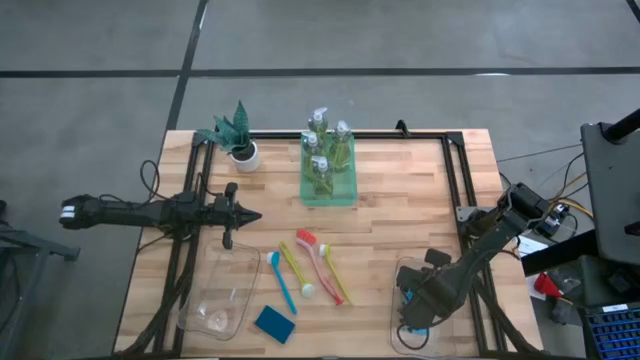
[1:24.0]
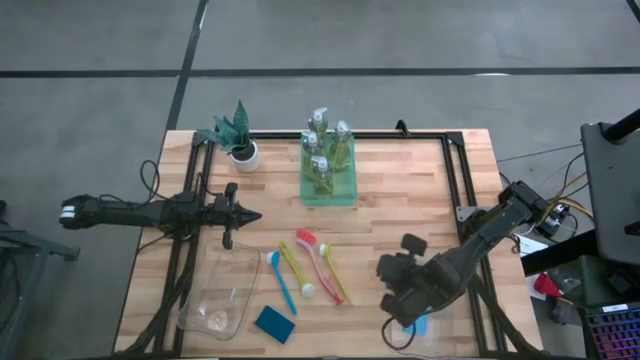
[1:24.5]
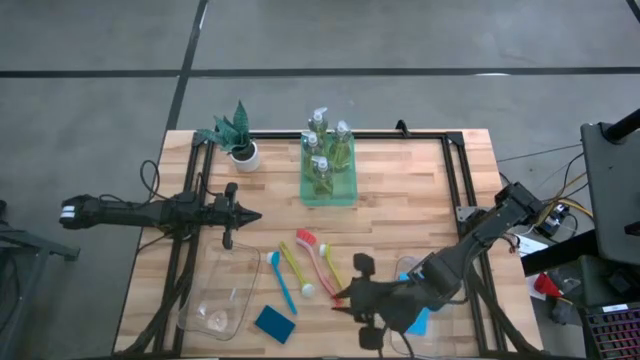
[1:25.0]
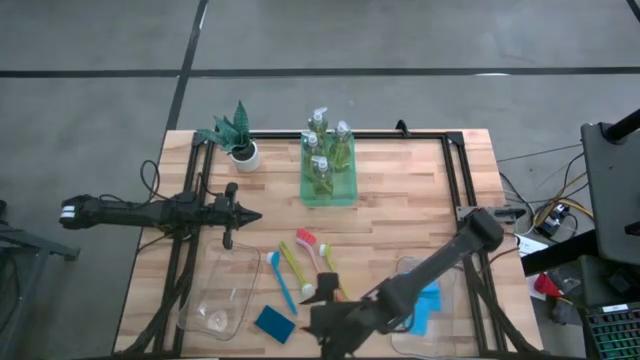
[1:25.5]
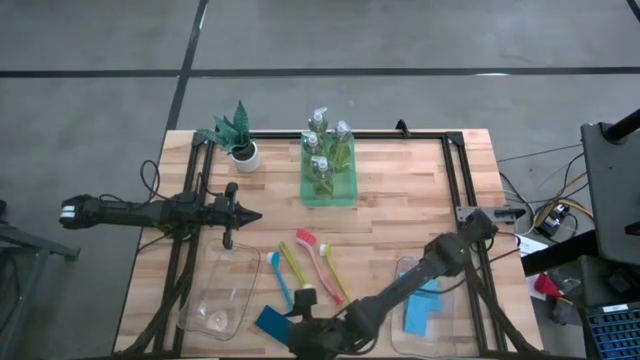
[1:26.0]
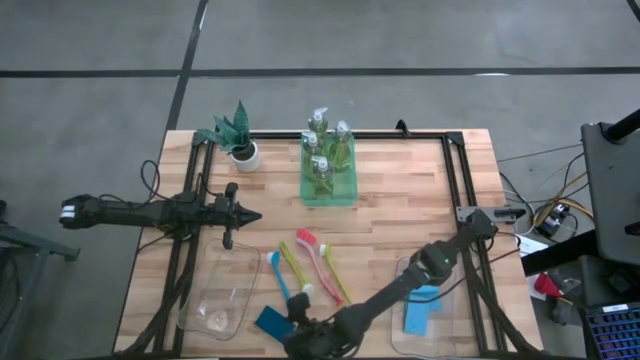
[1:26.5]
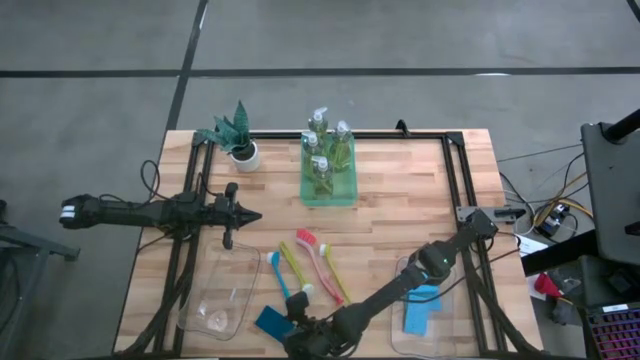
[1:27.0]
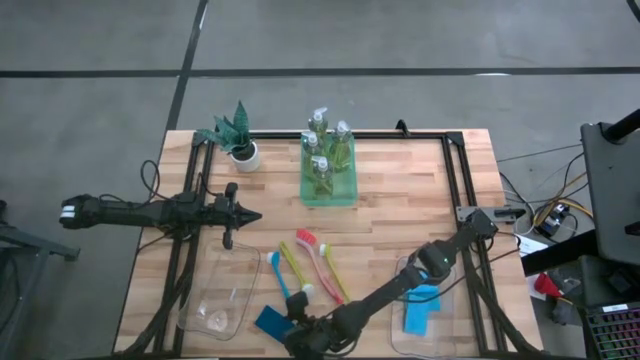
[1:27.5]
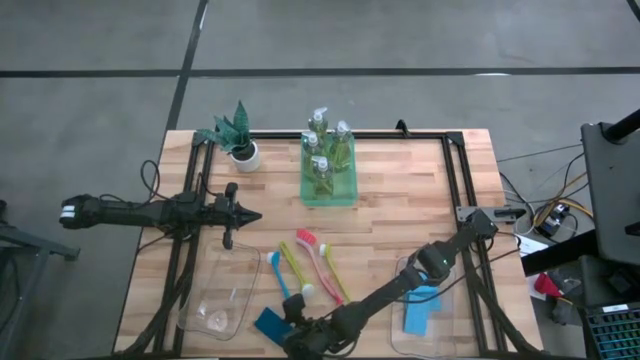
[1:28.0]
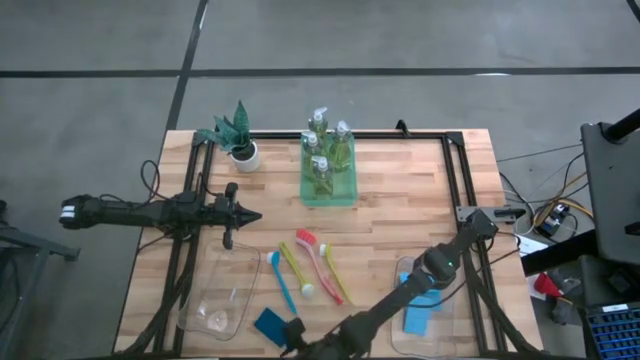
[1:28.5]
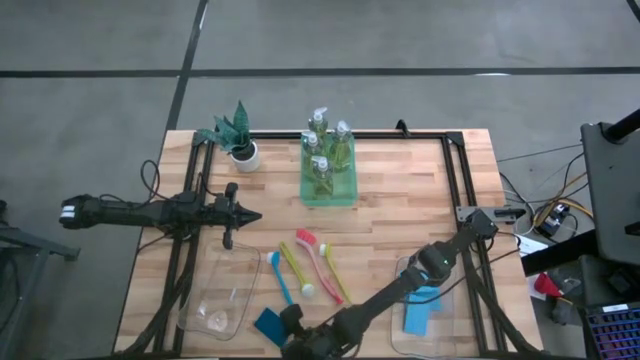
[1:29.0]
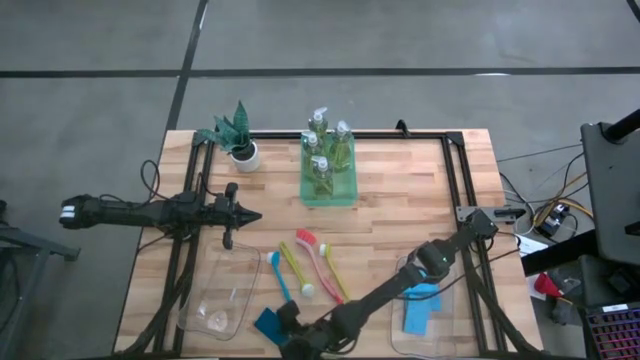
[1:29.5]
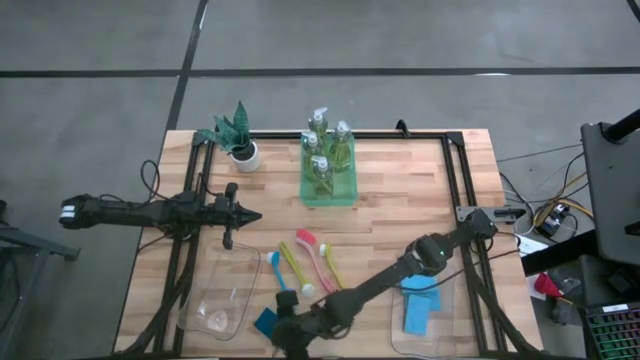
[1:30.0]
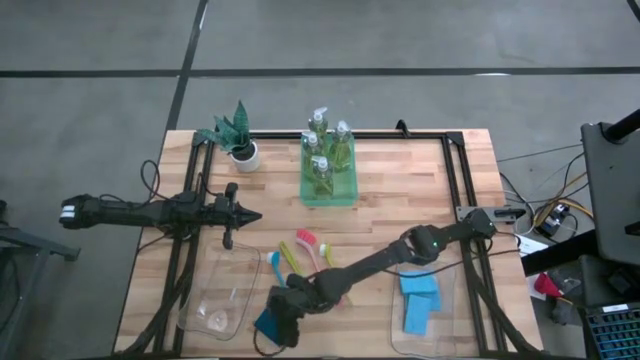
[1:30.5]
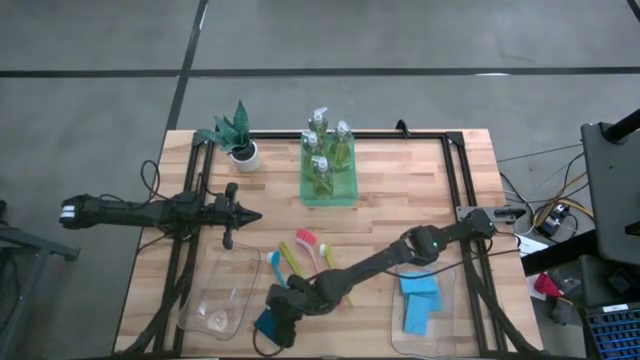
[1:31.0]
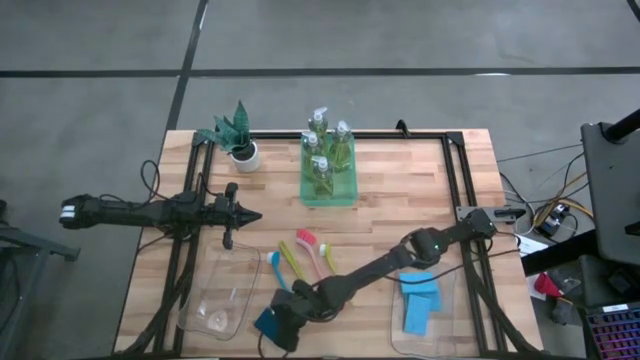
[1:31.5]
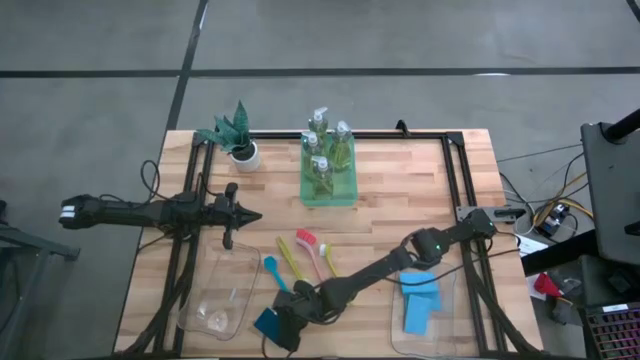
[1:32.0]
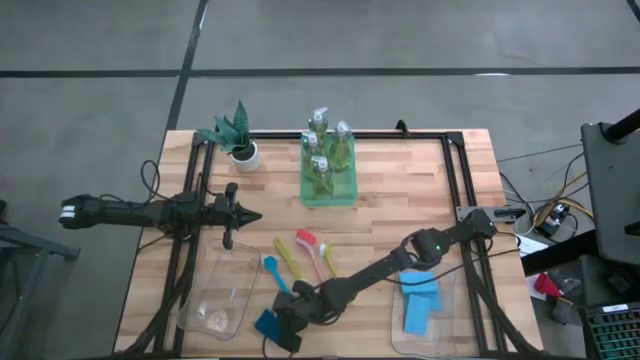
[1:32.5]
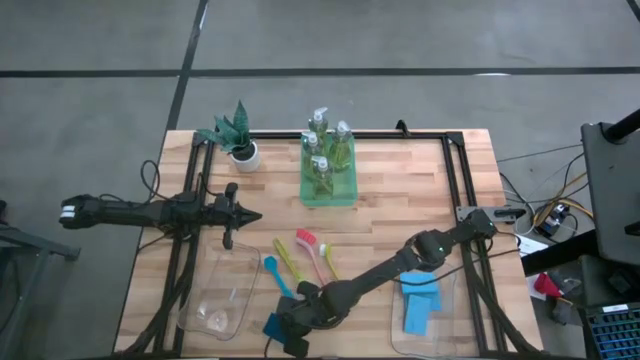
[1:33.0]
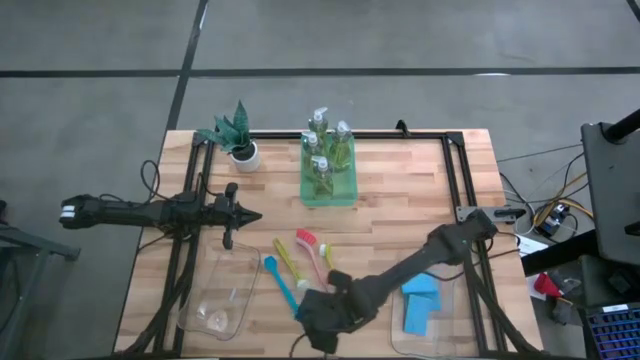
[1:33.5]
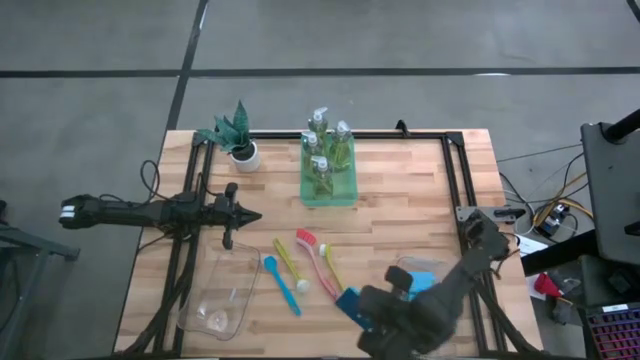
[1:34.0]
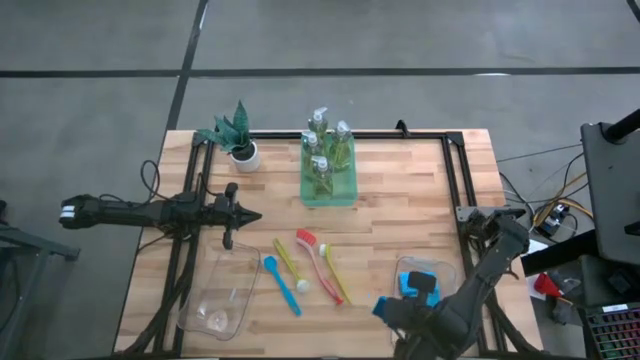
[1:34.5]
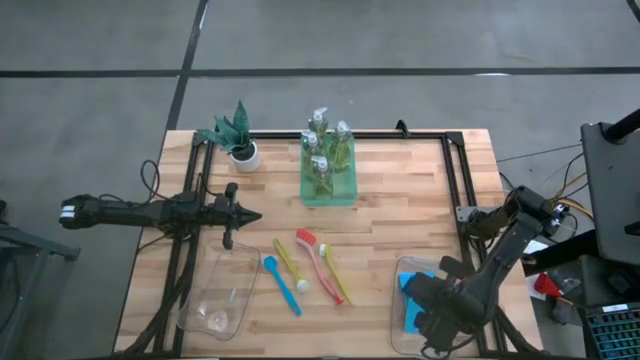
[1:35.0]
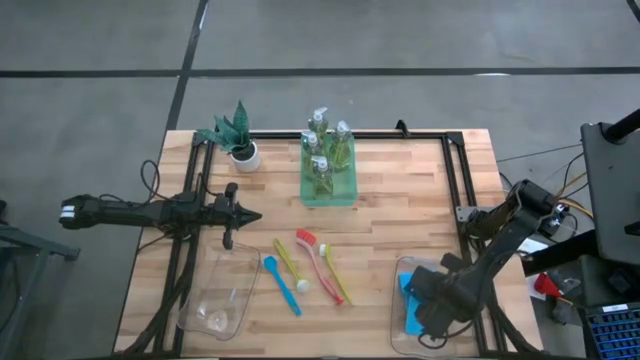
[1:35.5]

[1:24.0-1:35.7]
Task: Pick & Place Kitchen Sink Supplies
Put the blue sponge into the right transparent bin

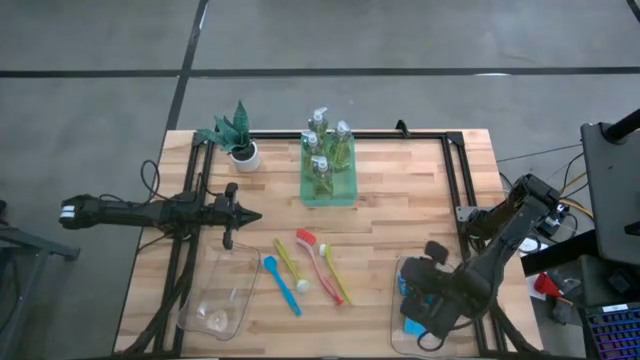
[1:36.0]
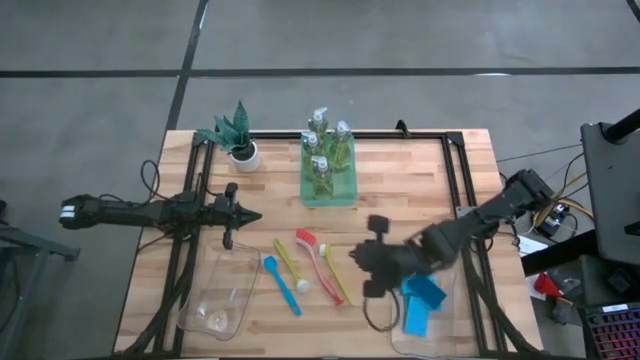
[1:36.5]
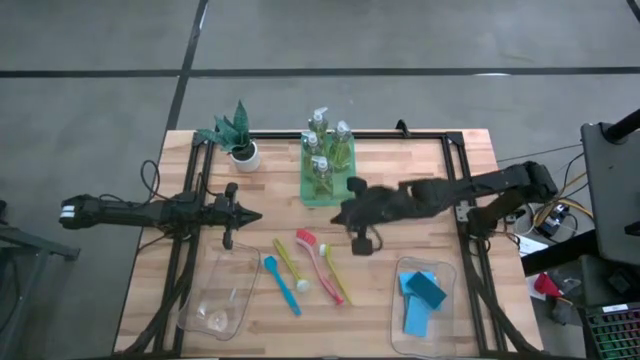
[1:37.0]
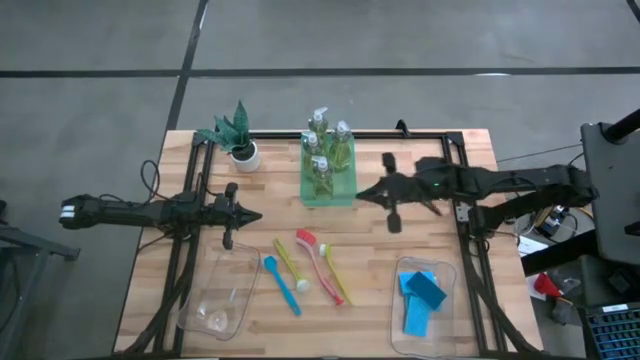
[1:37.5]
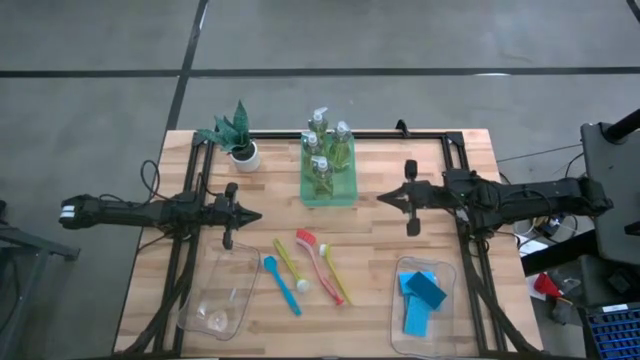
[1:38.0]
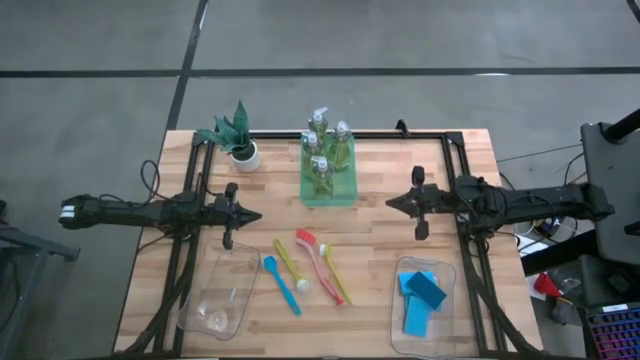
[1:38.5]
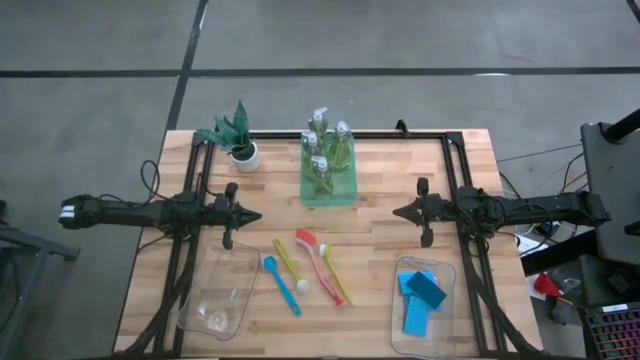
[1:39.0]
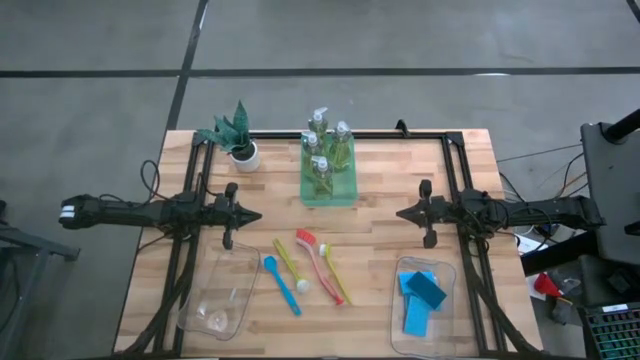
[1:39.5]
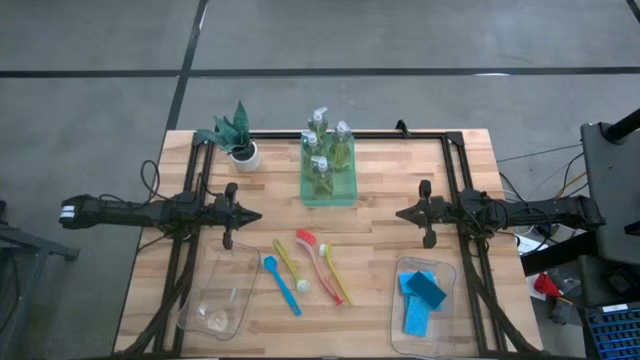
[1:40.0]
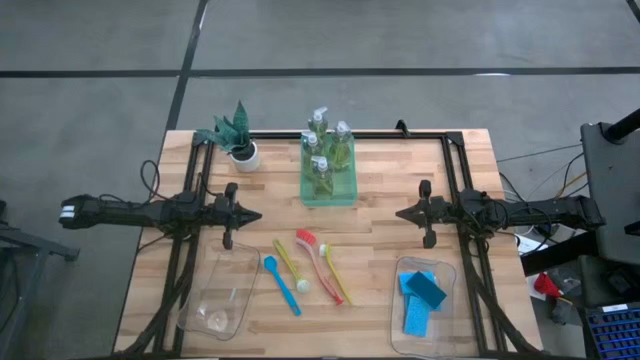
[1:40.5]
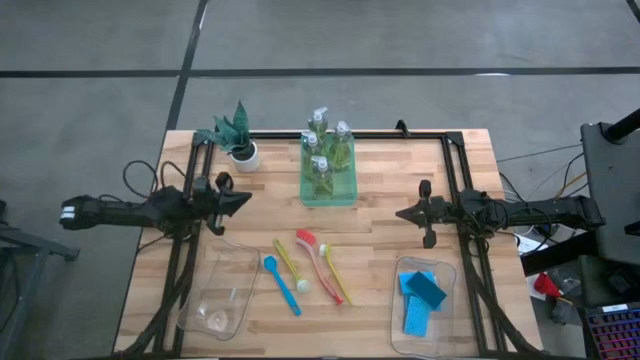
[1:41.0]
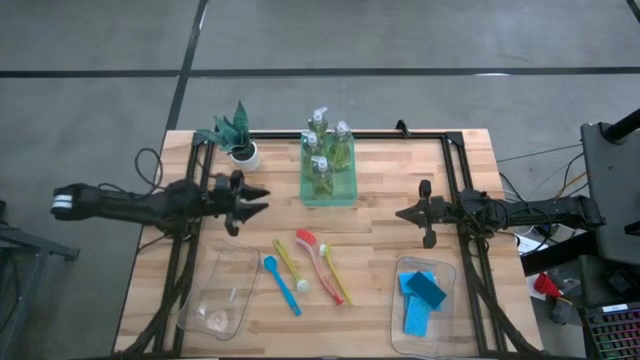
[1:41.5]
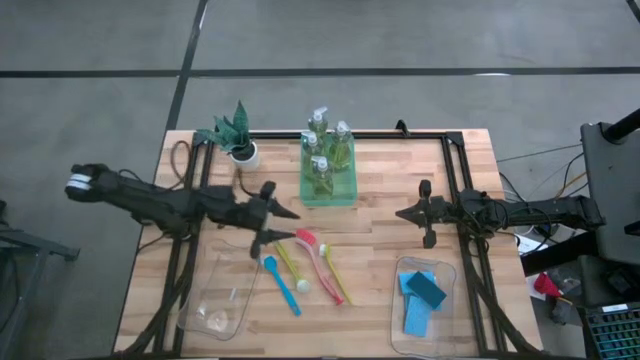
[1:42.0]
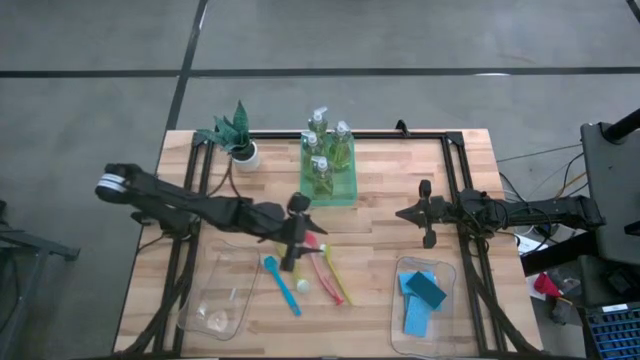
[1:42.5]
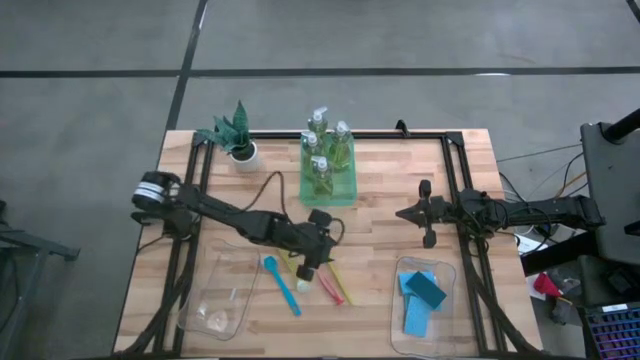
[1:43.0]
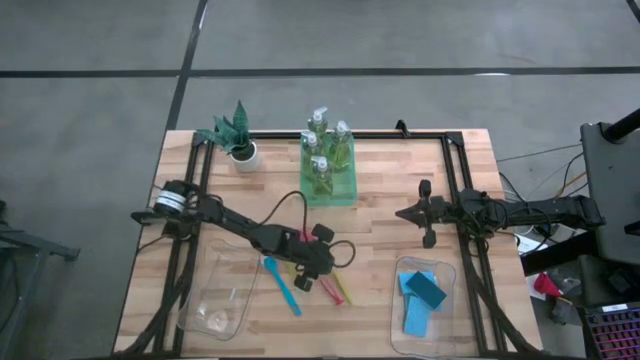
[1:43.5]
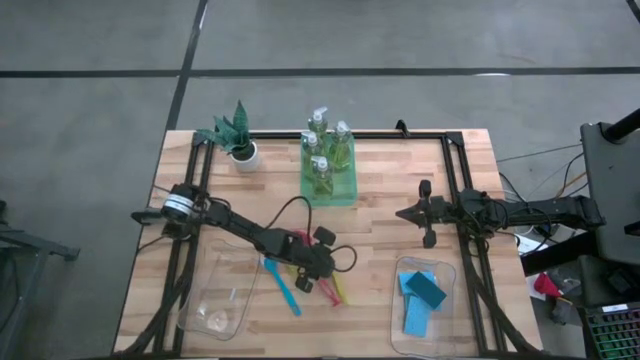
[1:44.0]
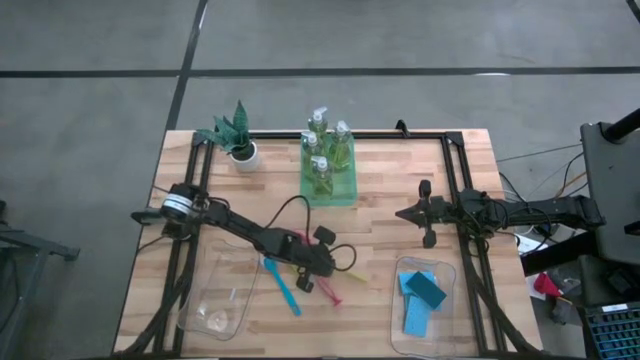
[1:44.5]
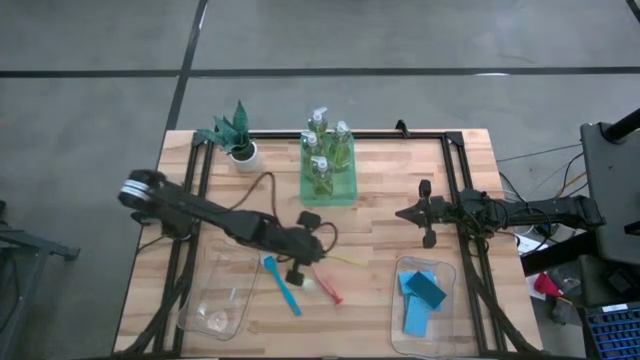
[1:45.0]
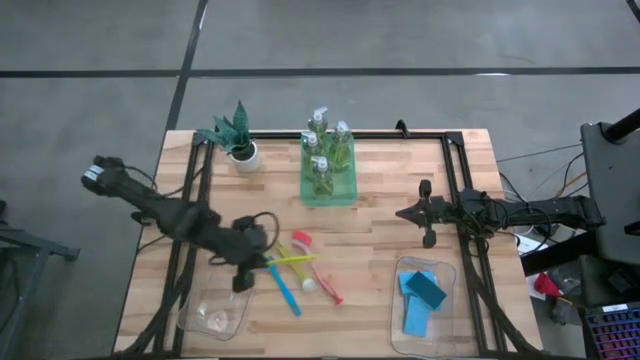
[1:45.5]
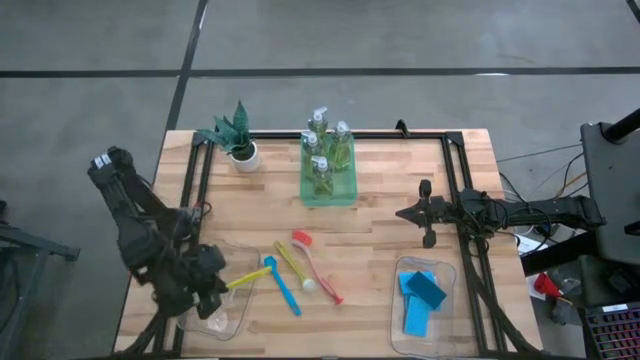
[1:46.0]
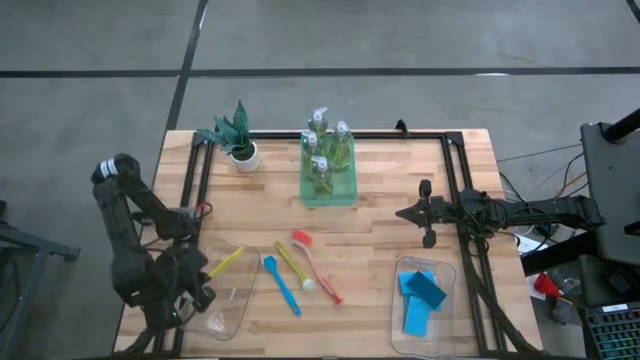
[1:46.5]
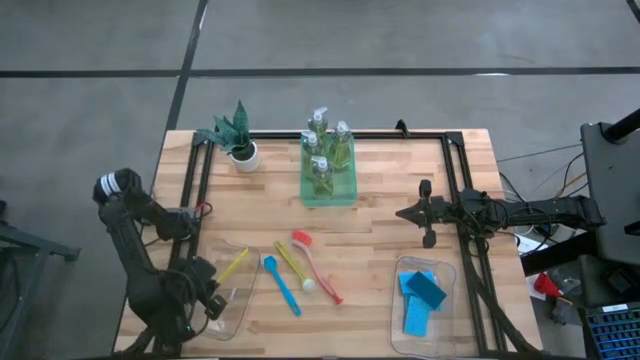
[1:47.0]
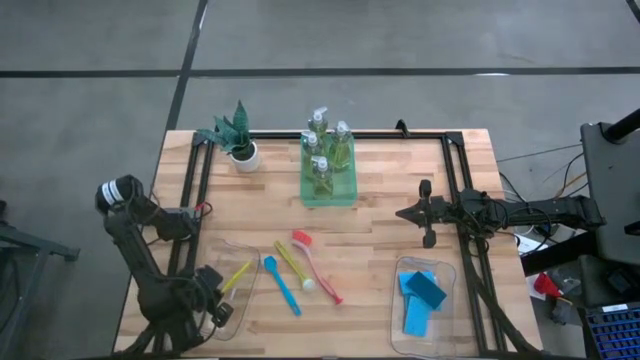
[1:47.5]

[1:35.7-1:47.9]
Put the right green toilet brush into the left transparent bin
